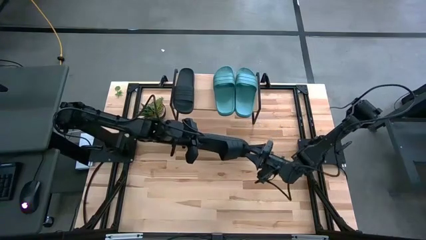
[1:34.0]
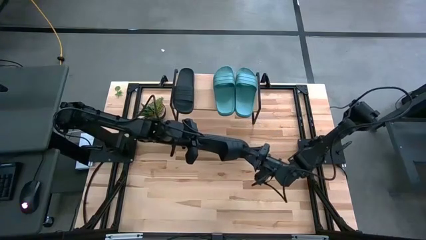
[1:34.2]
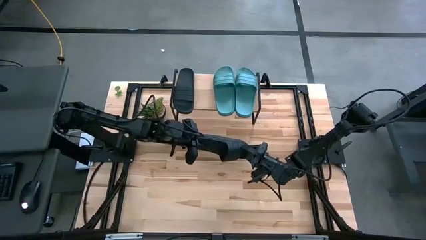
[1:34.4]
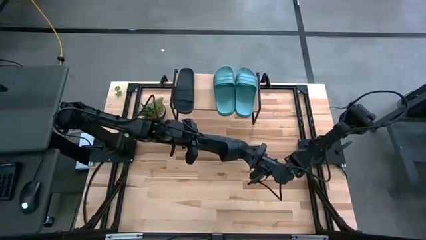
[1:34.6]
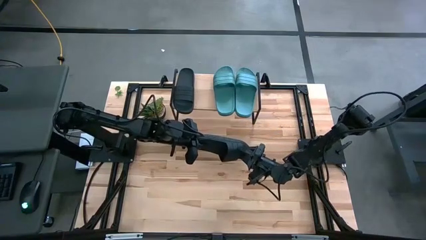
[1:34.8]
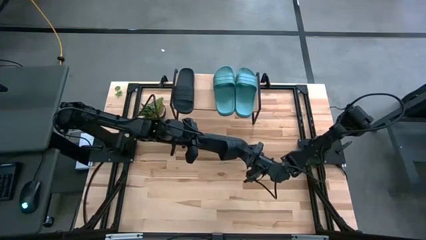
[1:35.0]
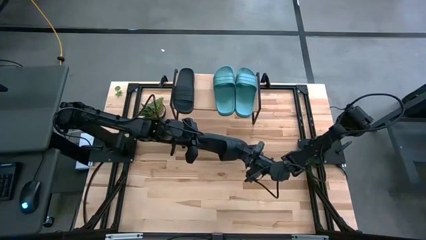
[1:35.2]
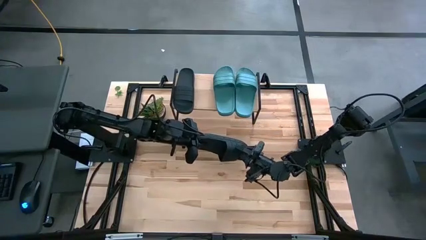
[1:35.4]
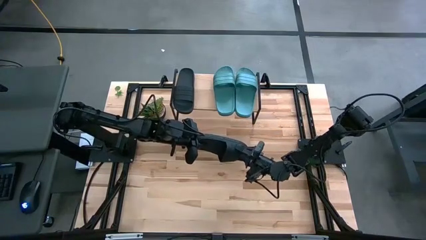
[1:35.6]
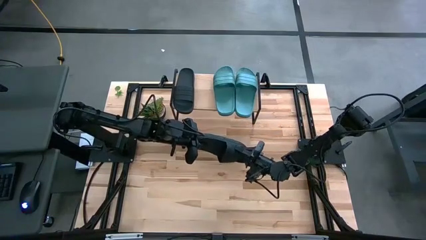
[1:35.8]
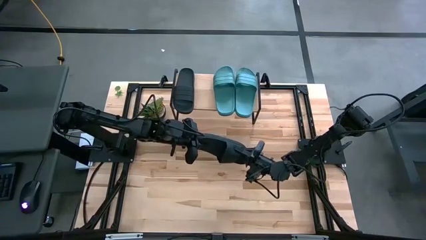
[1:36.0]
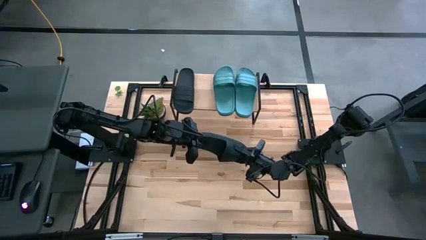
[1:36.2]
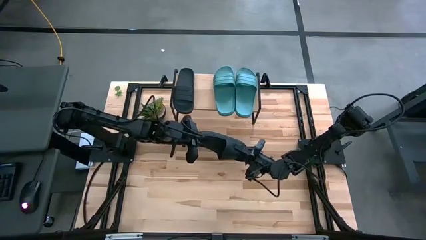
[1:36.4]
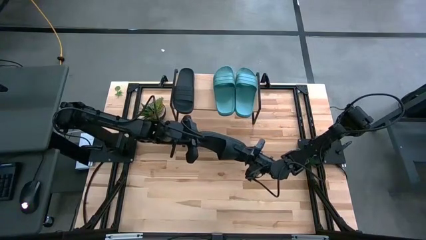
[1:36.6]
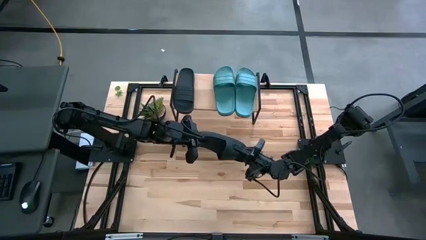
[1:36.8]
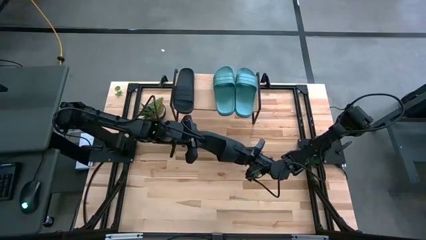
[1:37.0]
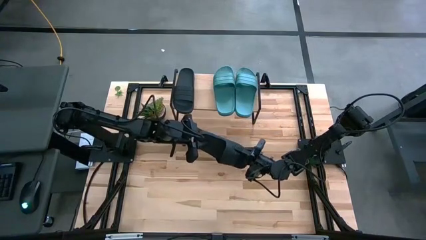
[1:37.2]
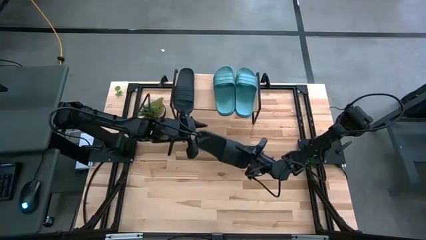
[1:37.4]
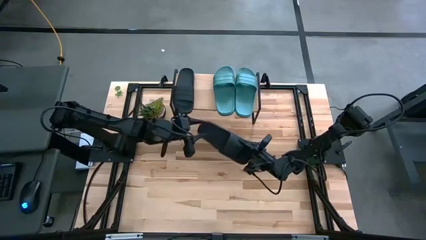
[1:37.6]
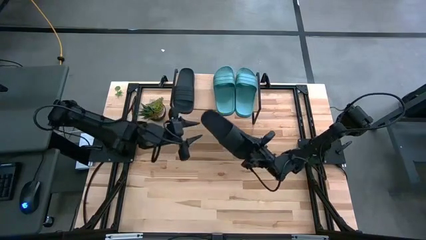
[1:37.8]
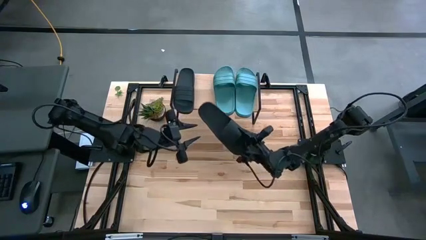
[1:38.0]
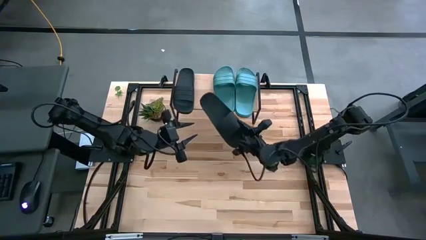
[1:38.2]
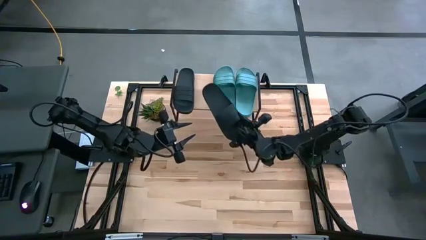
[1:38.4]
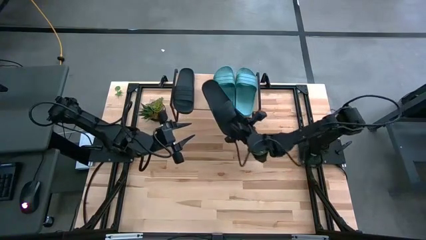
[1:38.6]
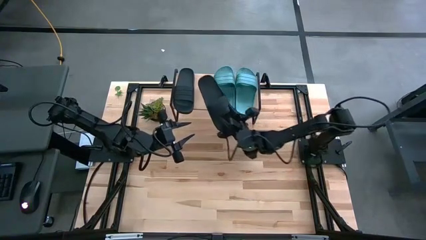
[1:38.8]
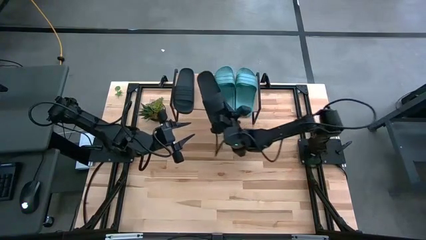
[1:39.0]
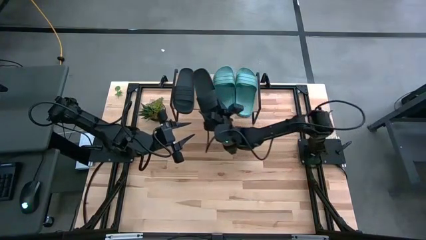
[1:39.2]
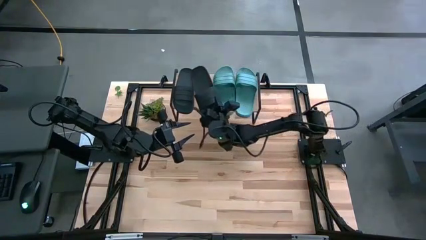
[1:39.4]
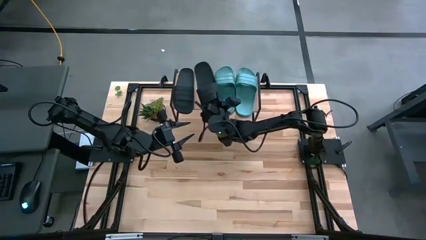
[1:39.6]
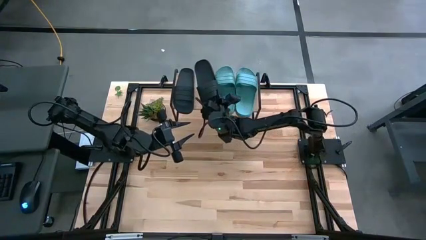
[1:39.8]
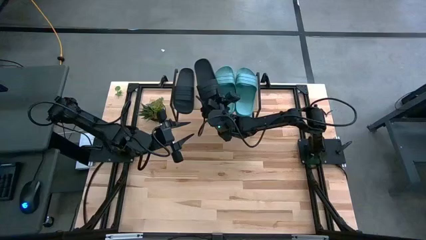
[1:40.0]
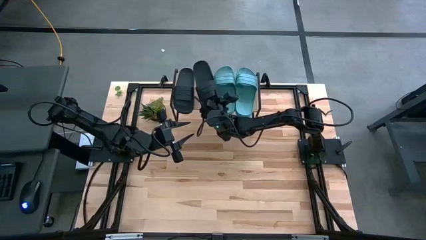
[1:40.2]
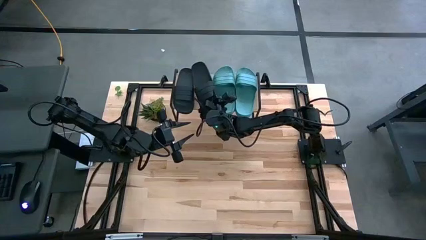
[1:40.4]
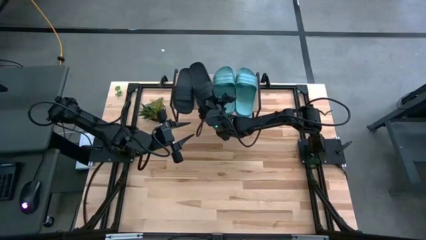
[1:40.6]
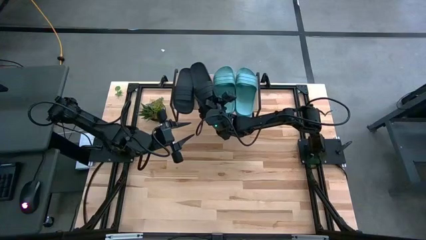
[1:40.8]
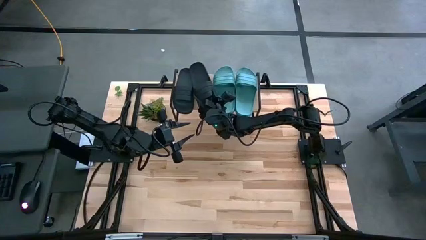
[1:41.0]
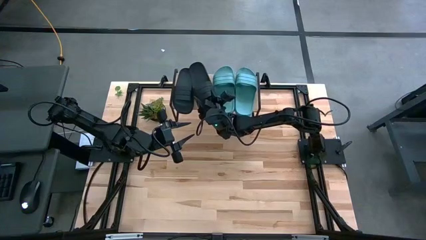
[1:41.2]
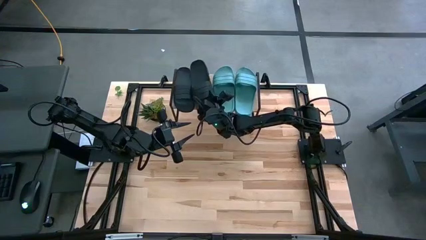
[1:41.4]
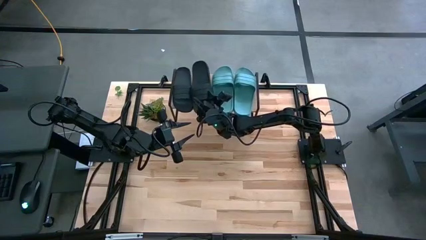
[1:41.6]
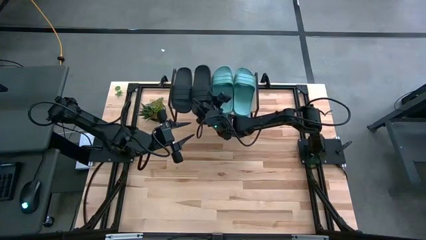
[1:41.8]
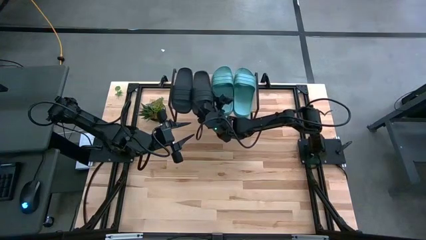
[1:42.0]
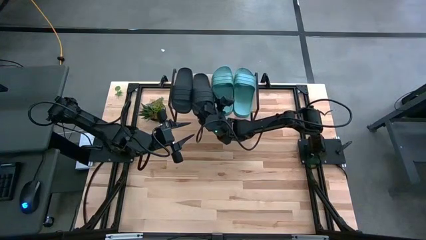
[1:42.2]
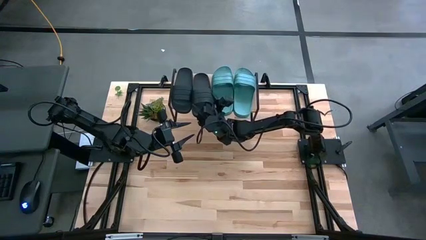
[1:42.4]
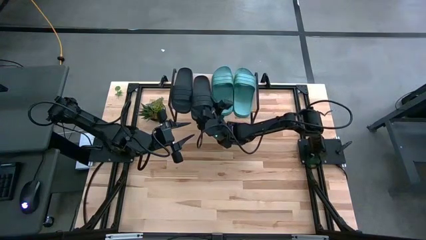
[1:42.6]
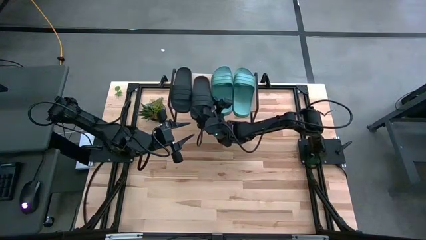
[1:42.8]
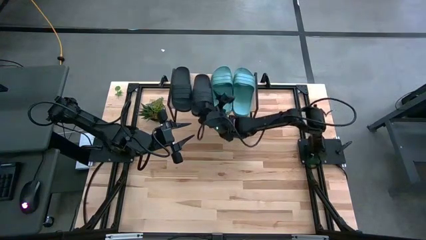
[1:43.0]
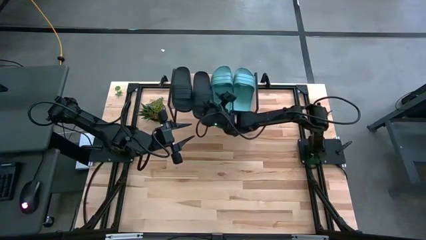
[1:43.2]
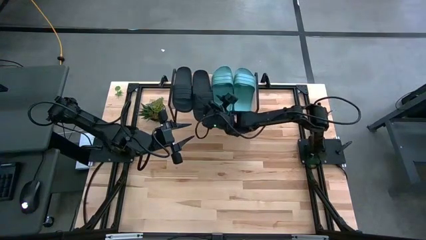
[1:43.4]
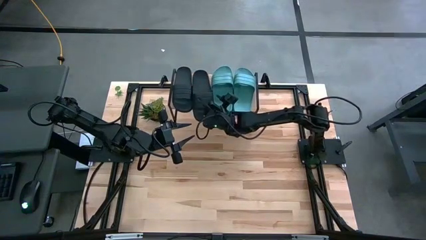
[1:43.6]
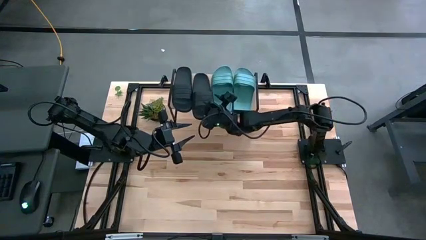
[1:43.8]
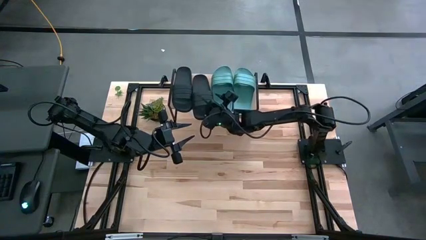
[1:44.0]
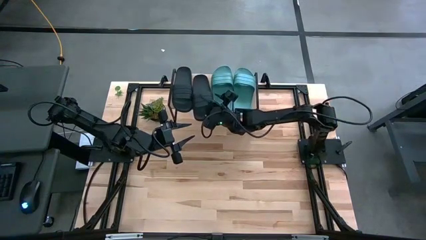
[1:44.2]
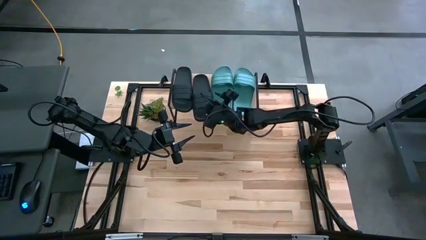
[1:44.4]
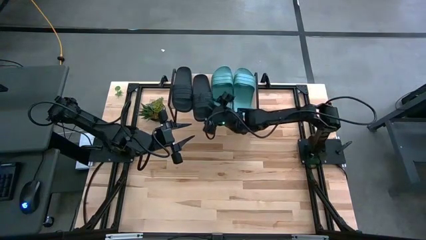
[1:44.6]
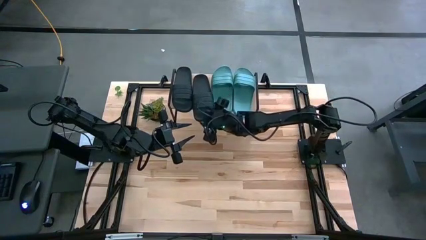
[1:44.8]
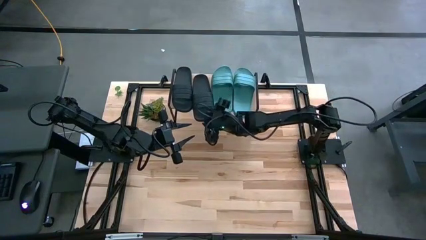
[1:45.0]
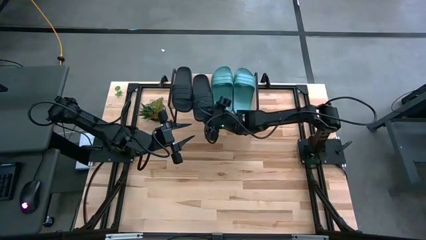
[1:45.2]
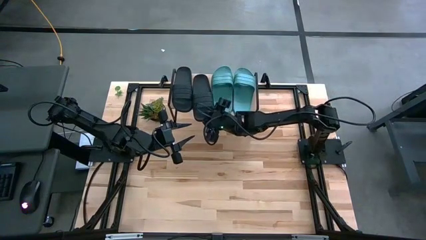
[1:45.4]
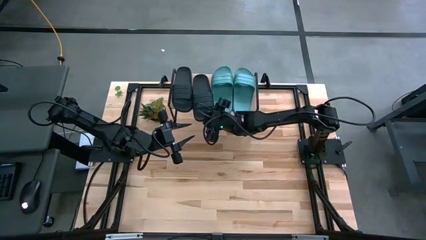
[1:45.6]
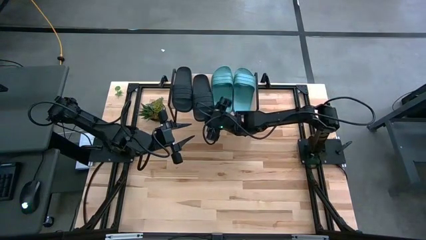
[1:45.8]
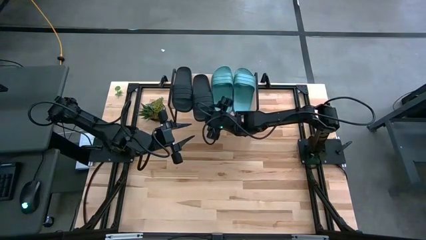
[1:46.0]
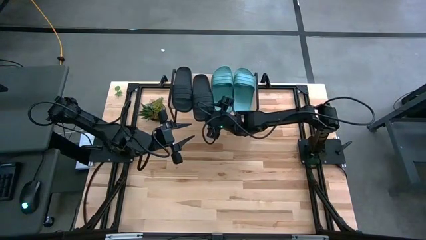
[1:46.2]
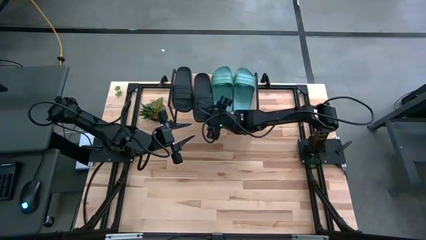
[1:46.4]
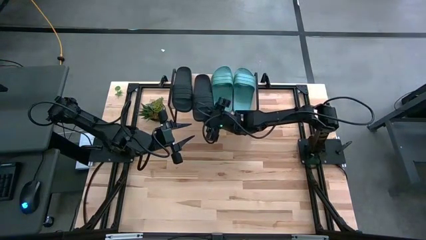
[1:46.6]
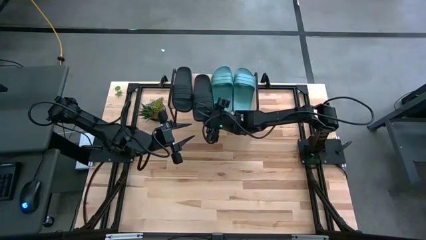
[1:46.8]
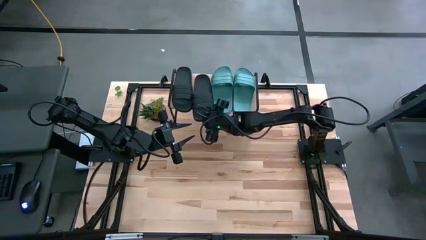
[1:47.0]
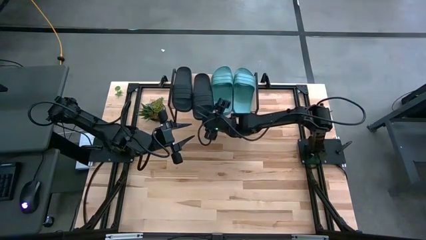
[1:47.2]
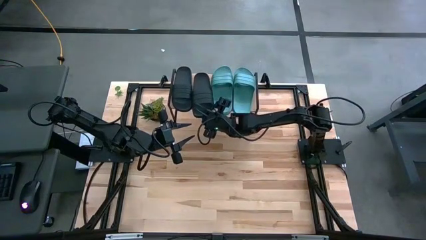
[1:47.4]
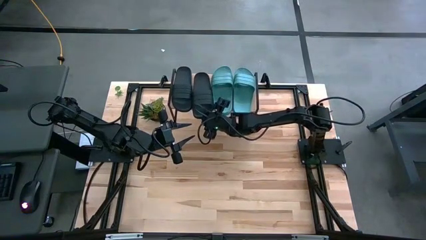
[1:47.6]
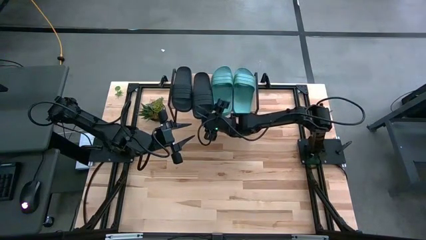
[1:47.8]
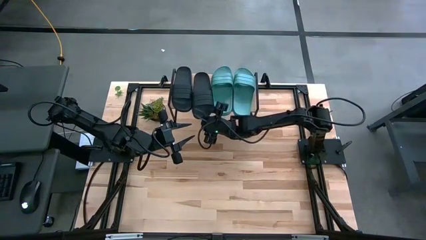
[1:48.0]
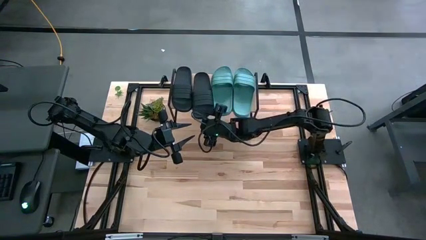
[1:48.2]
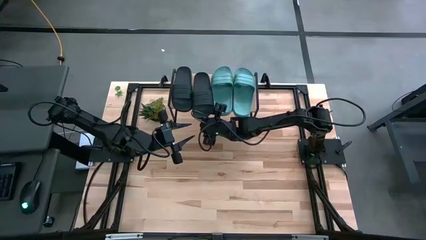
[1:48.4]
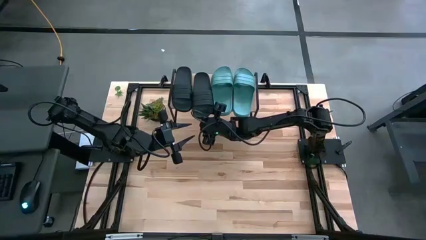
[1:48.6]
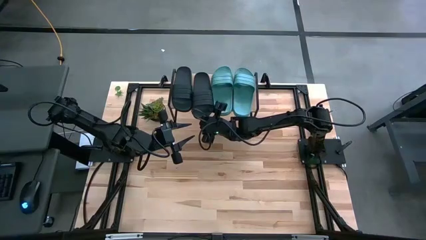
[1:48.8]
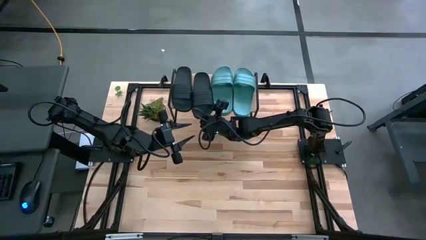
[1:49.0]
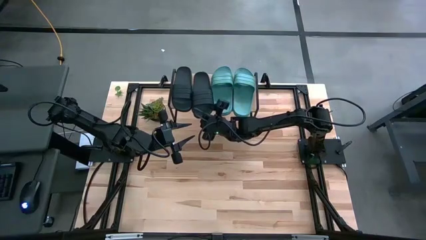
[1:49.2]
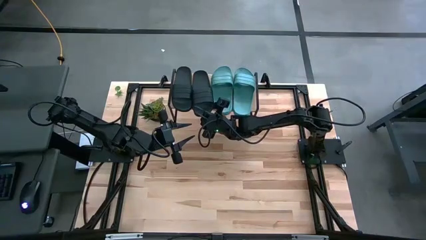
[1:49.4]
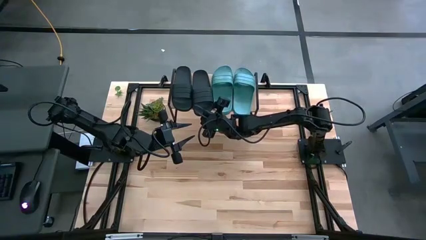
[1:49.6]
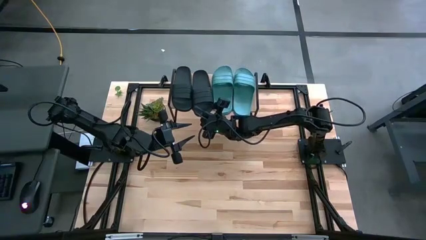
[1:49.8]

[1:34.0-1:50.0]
Task: Pick and place slides into the shelf
Put the black slide on the shelf
